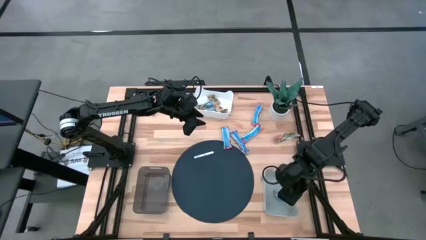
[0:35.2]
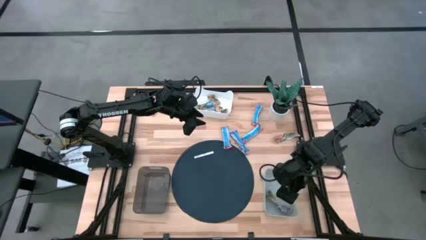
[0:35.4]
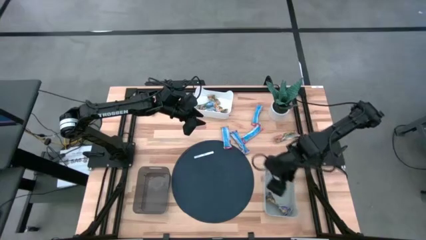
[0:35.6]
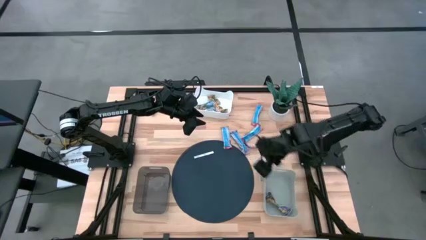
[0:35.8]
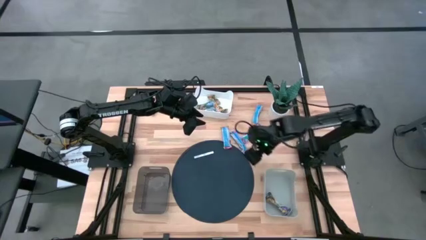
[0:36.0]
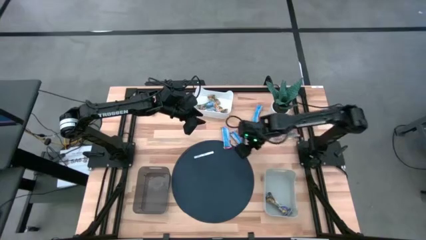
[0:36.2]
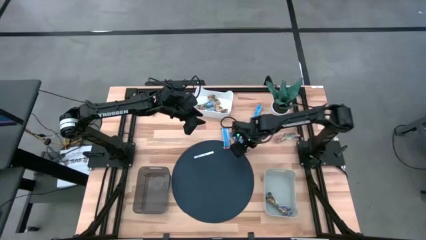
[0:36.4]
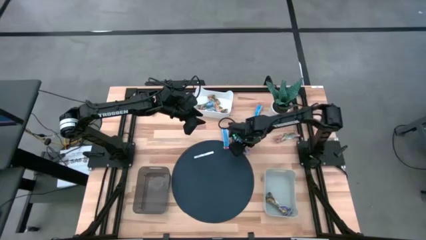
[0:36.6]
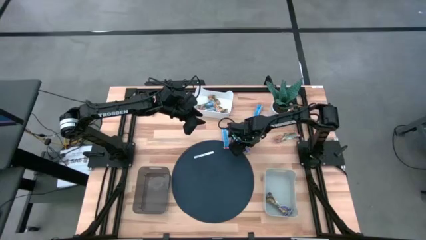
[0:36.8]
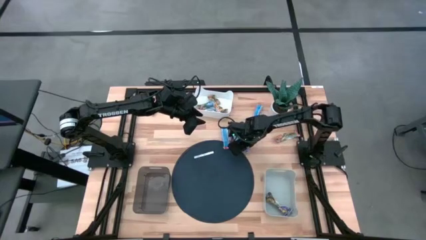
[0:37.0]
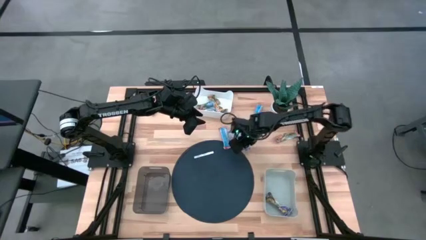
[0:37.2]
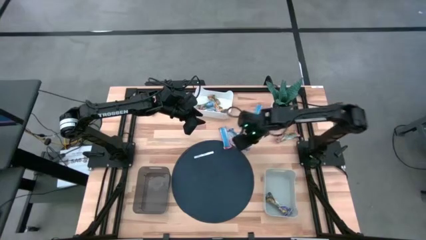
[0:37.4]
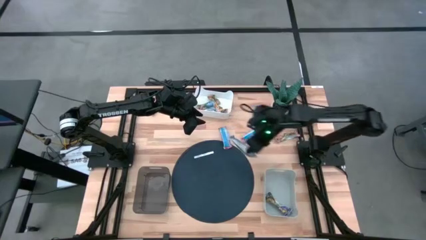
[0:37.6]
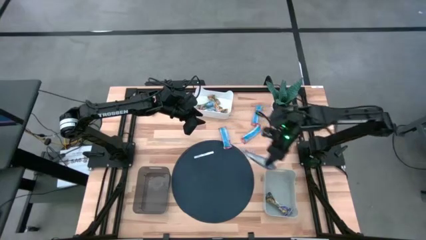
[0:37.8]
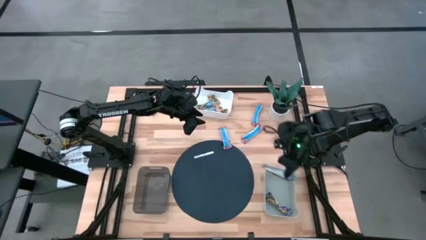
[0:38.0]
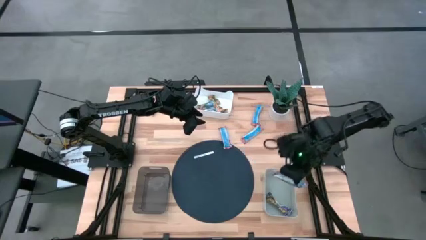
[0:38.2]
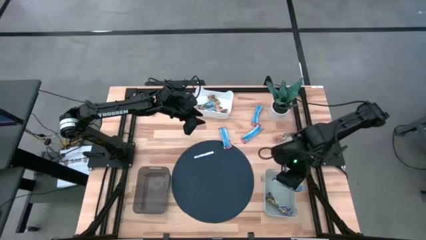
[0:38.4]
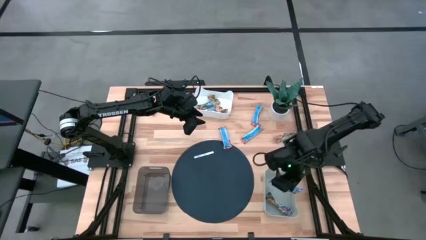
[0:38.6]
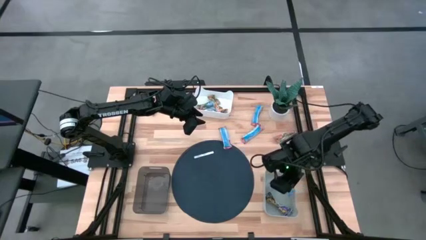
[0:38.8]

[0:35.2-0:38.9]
Task: Pick and place Granola Bars by type
Put the blue granola bar into the gray bin

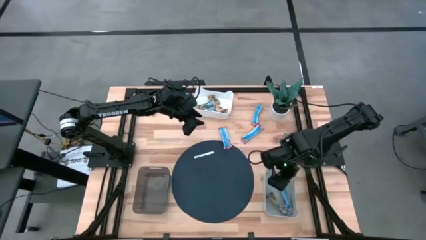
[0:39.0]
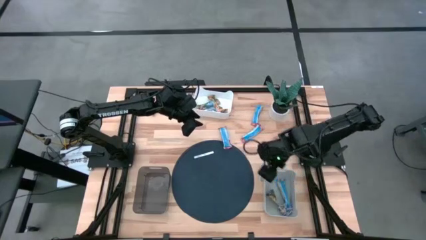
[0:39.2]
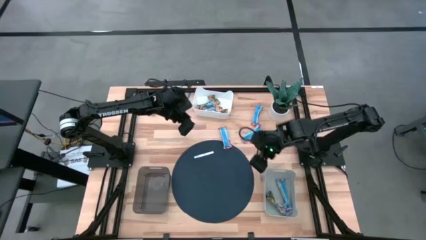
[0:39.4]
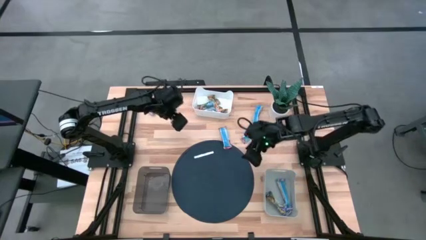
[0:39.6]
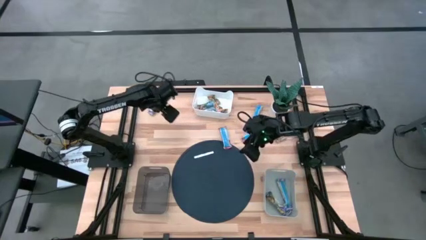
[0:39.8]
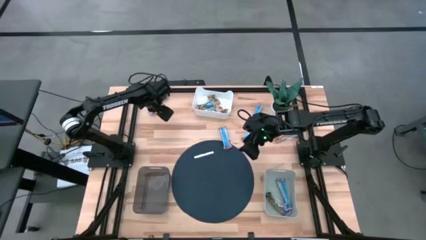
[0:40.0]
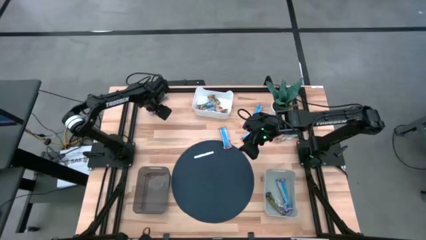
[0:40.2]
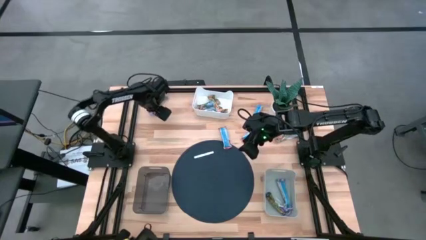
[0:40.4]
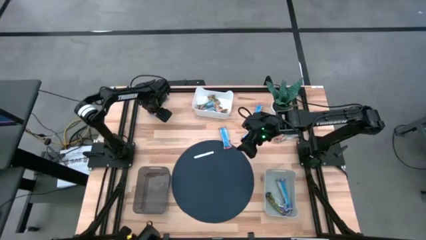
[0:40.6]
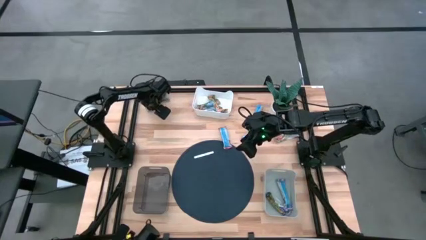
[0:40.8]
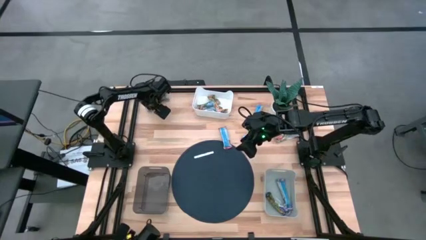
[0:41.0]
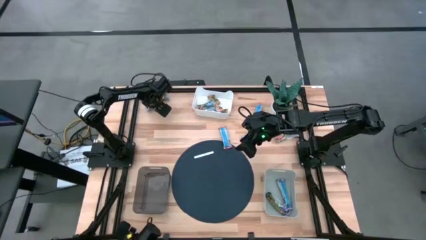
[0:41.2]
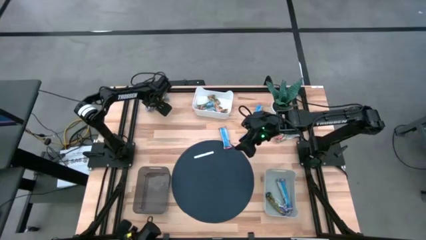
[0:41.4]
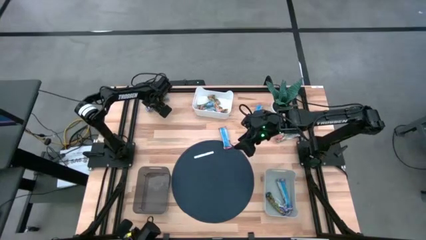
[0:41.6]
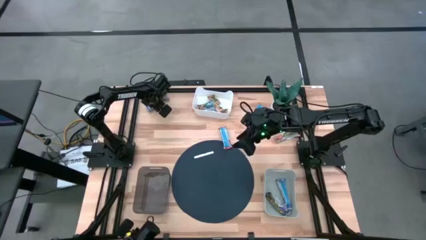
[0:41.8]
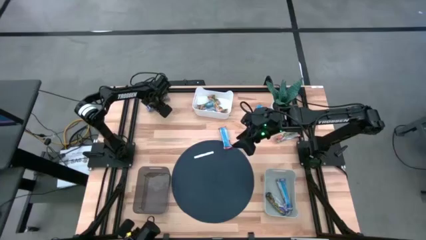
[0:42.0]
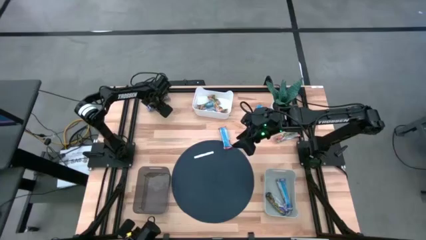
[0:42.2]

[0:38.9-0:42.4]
Put the blue granola bar into the gray bin

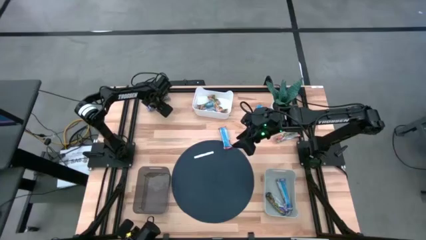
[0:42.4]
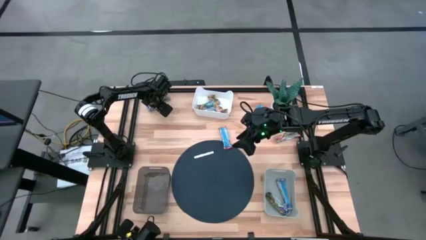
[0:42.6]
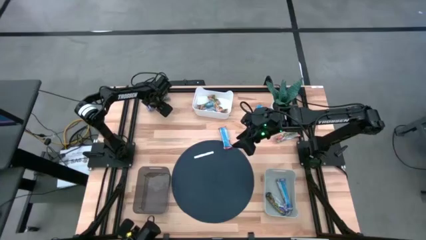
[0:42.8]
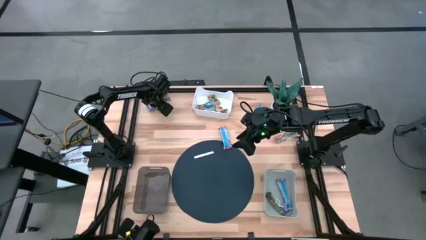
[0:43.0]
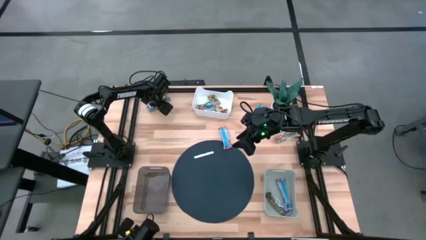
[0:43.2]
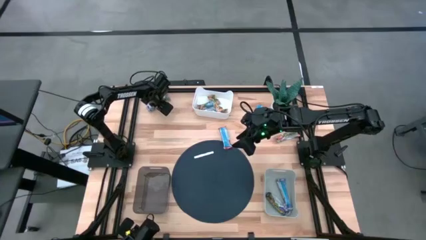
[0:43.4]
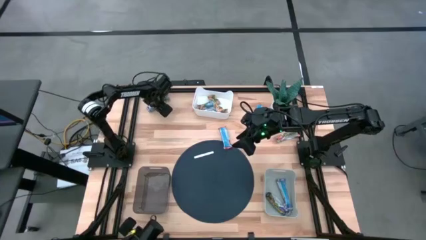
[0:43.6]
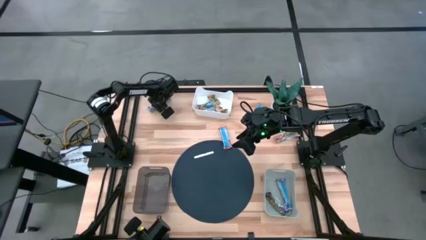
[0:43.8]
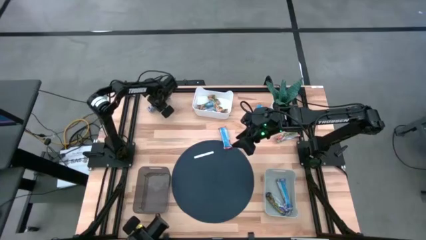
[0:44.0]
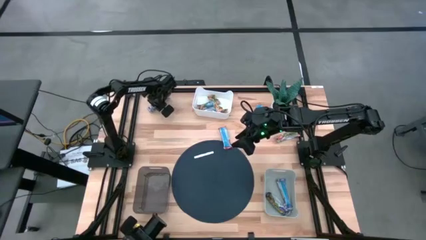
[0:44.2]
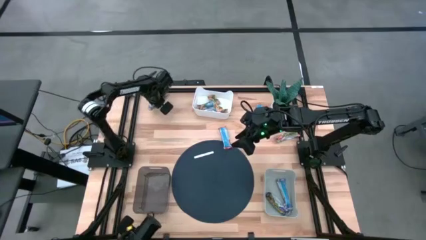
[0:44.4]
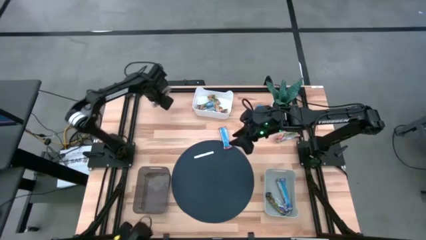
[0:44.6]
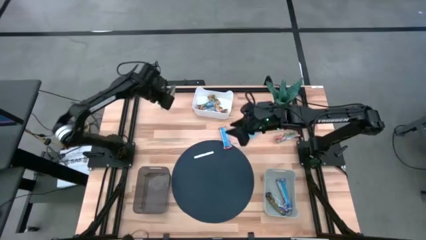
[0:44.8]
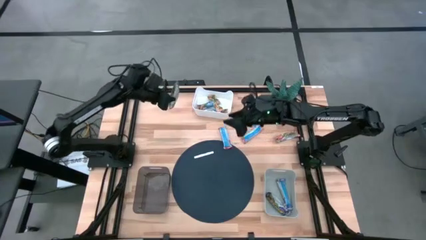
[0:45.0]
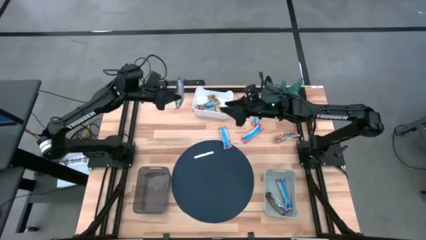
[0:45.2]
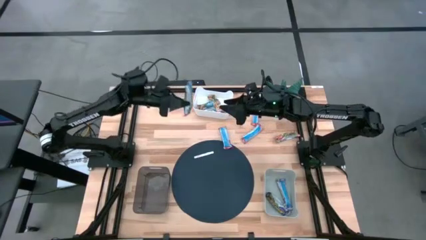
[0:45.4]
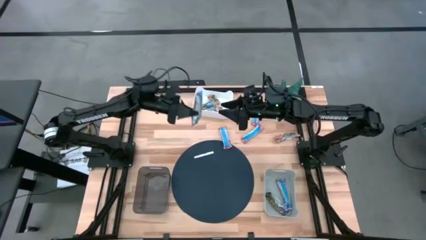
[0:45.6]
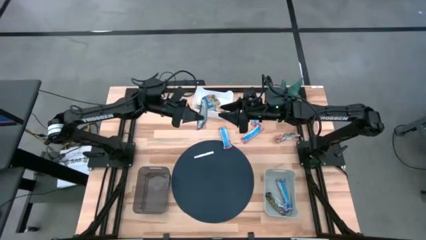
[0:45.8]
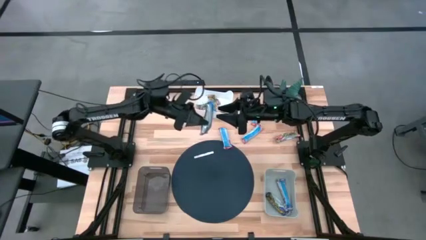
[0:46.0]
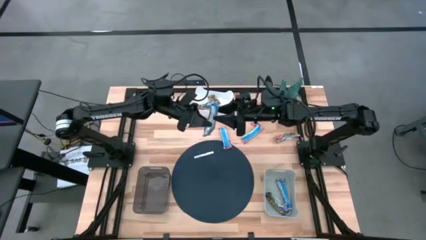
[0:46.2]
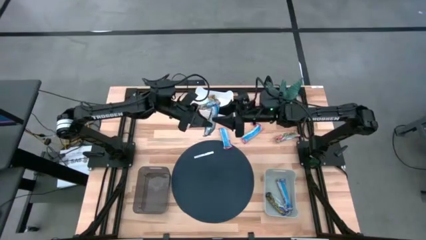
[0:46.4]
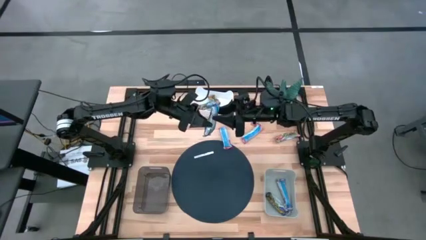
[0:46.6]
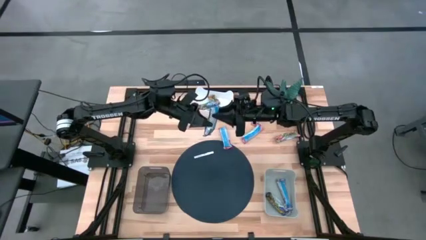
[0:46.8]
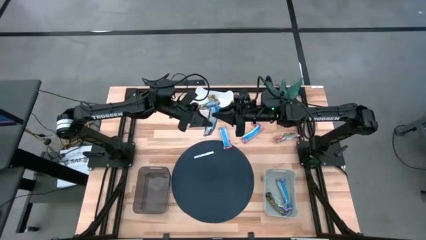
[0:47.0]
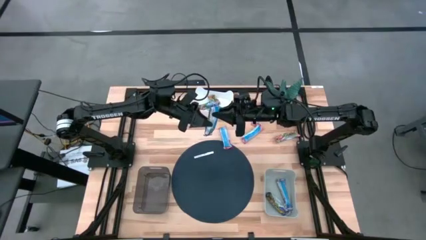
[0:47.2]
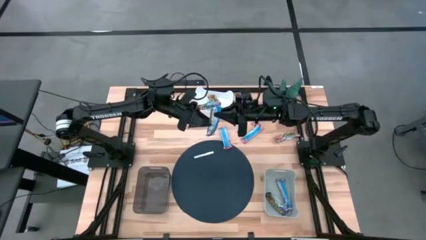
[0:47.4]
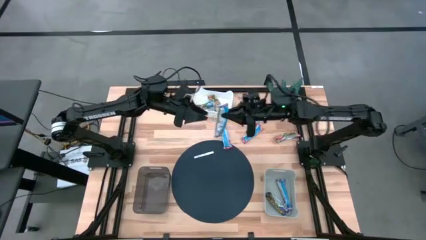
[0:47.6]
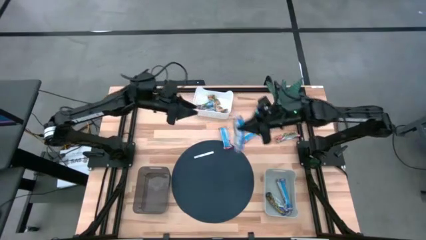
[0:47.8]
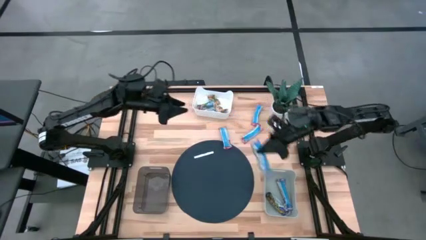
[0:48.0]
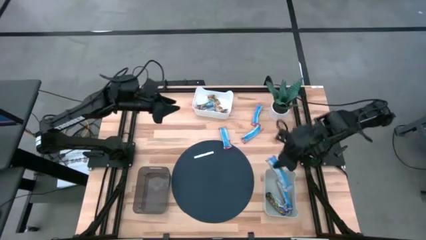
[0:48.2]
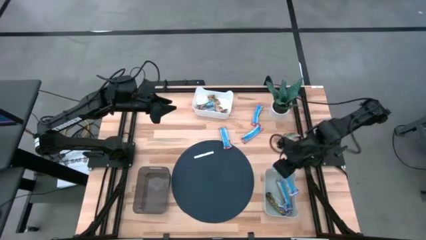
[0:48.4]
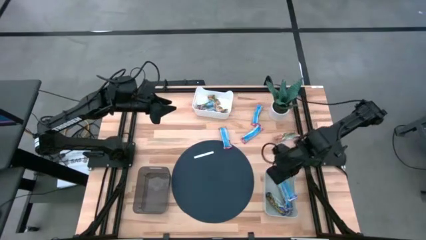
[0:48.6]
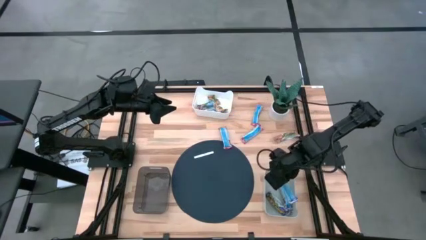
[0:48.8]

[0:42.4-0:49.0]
Put the blue granola bar into the gray bin

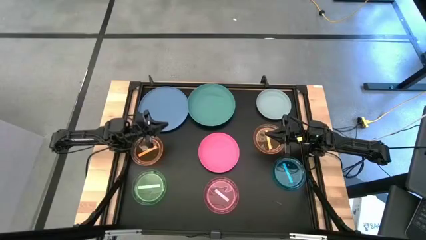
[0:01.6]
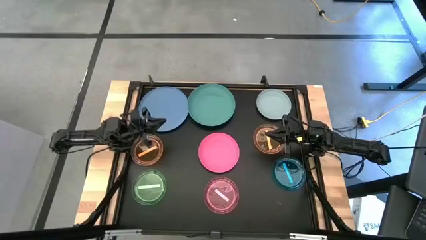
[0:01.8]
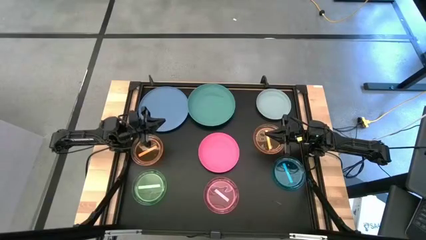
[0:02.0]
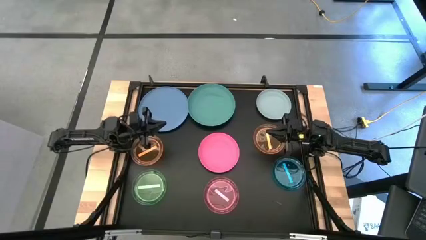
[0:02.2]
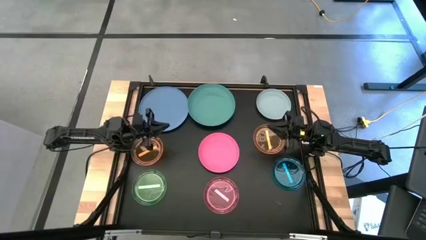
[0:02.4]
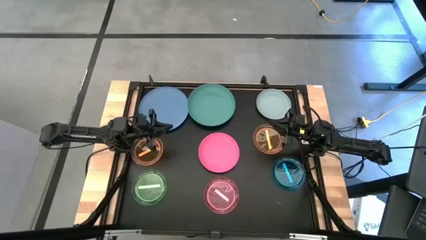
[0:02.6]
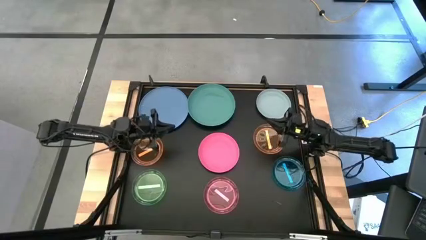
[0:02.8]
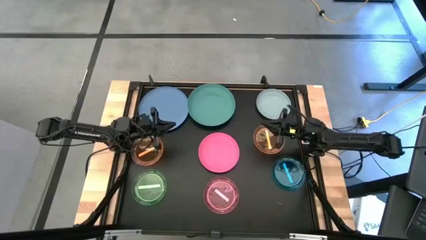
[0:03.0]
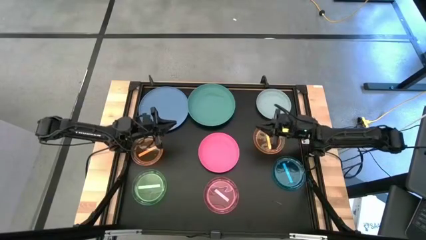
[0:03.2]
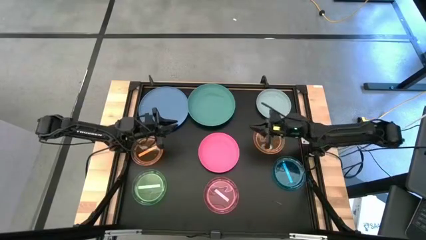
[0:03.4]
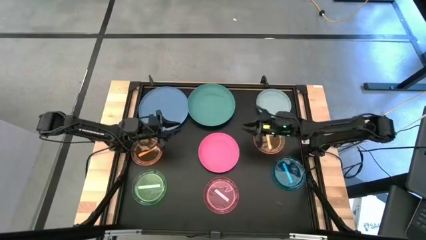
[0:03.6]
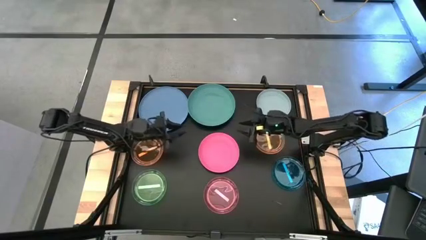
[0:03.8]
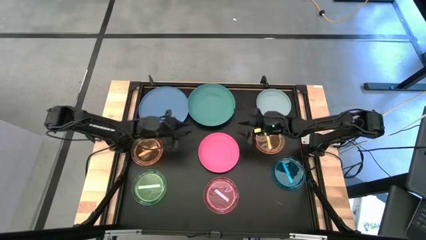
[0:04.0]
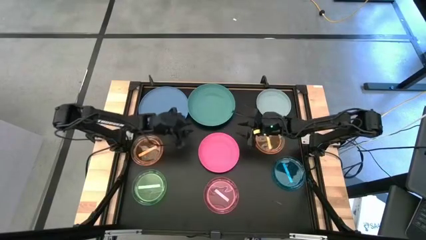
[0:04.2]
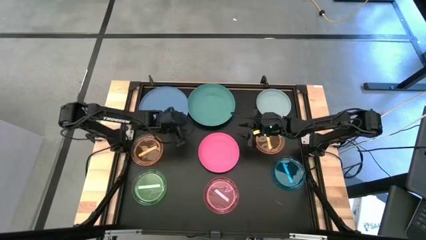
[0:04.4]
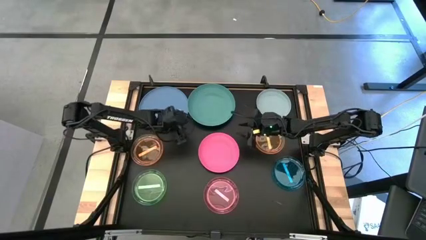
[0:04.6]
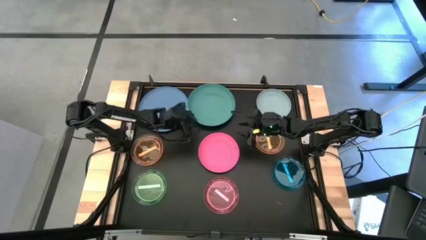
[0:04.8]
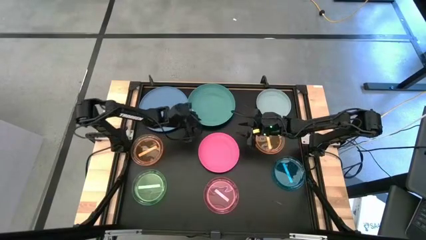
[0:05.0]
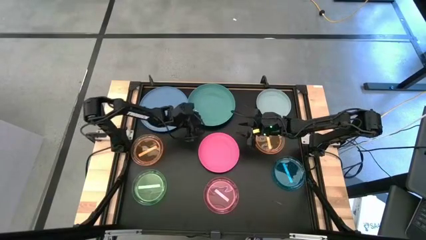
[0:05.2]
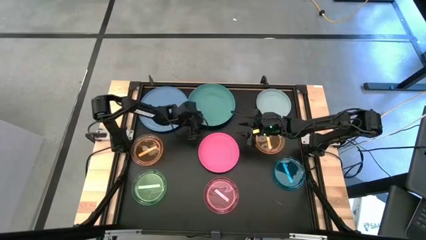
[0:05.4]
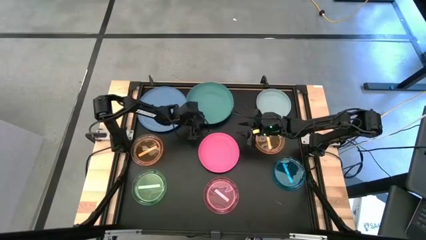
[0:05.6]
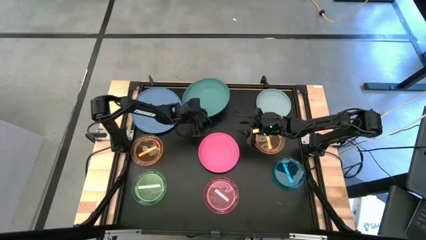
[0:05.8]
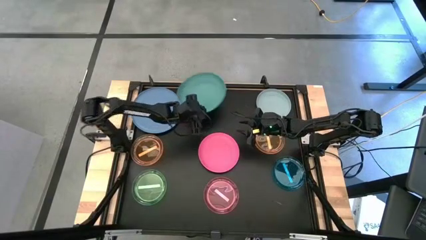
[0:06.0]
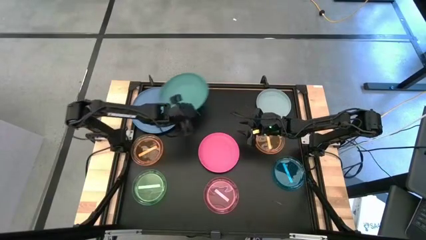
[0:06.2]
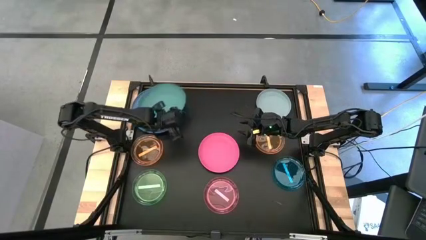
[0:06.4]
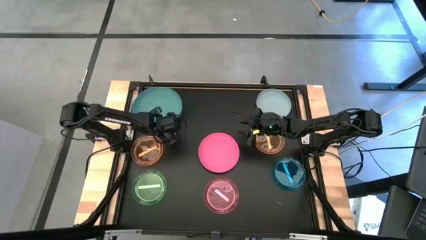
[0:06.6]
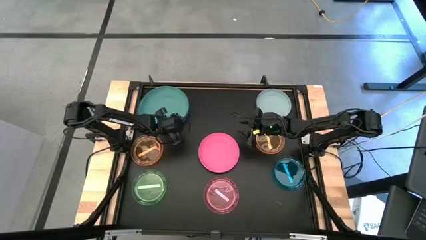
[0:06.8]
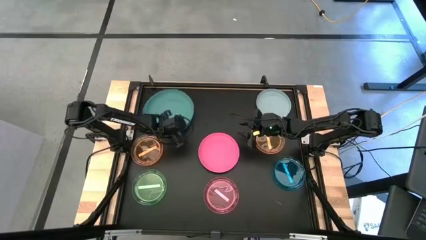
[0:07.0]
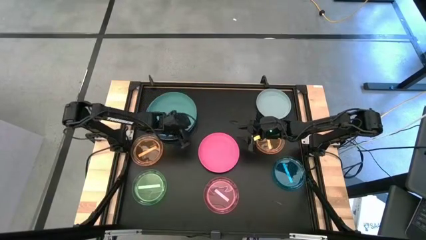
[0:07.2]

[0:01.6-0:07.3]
Task: Stack plastic plates
Stack the green plate on the blue plate
